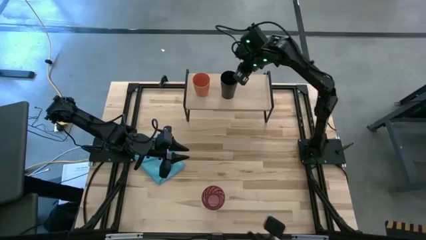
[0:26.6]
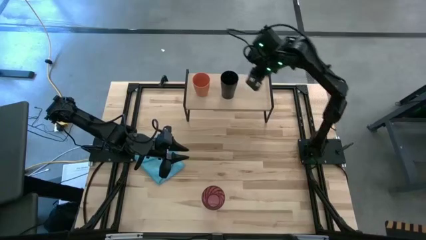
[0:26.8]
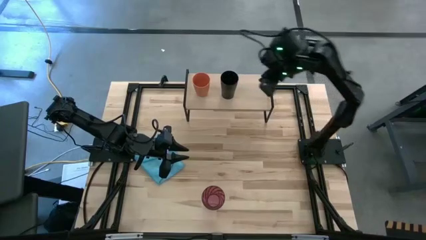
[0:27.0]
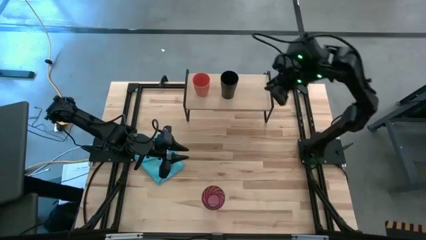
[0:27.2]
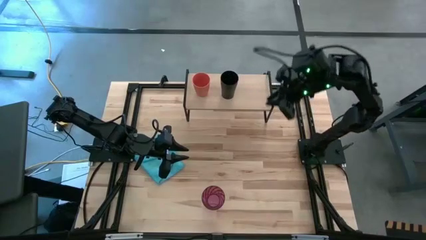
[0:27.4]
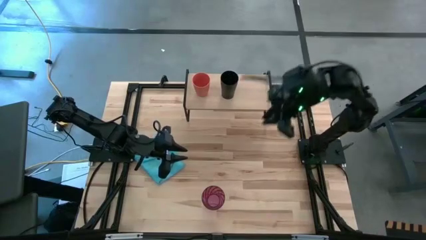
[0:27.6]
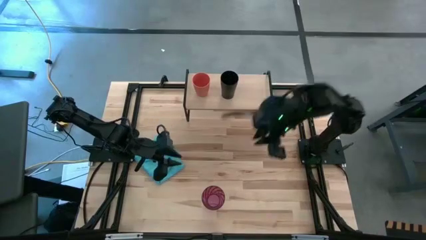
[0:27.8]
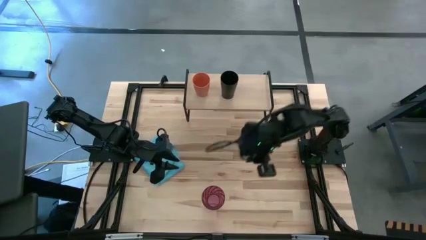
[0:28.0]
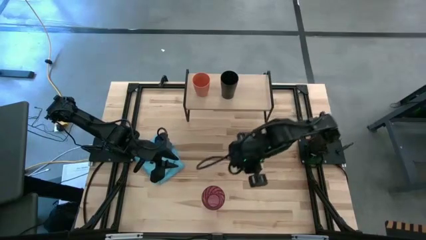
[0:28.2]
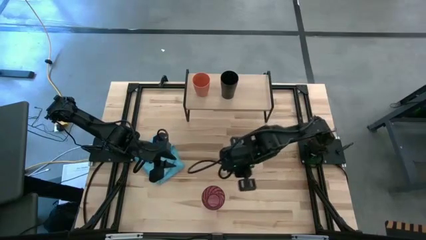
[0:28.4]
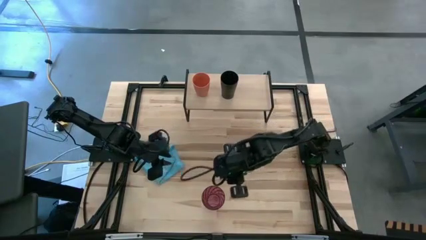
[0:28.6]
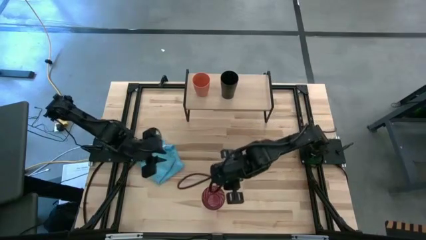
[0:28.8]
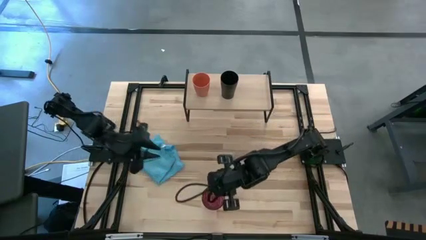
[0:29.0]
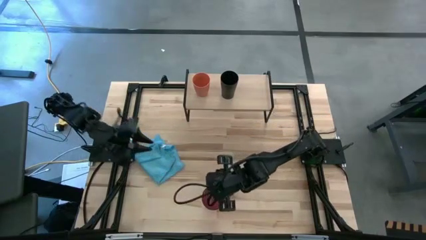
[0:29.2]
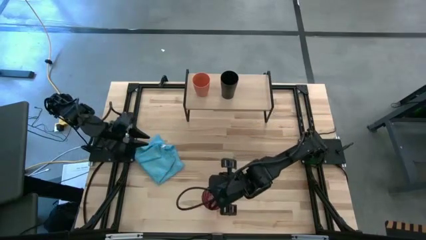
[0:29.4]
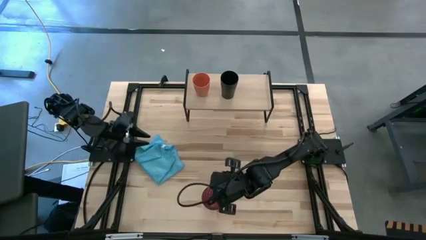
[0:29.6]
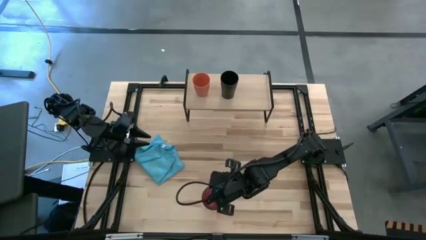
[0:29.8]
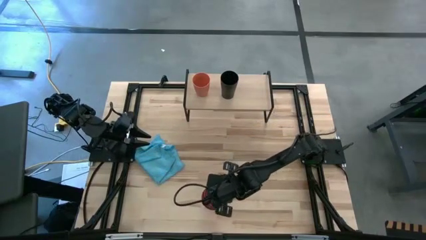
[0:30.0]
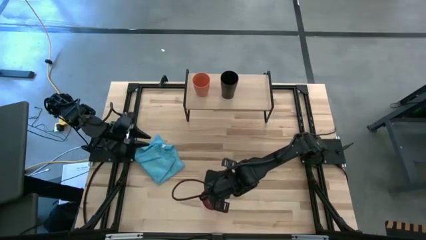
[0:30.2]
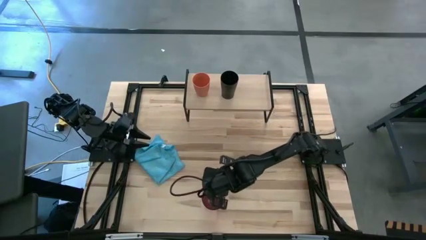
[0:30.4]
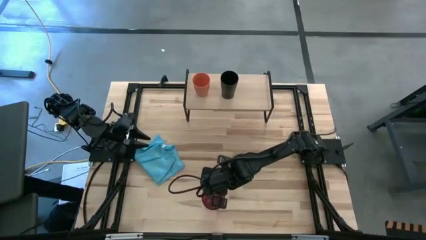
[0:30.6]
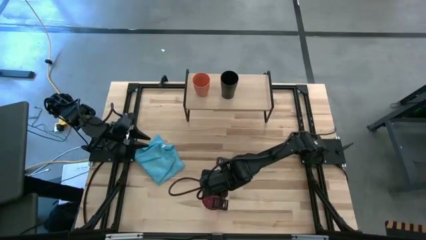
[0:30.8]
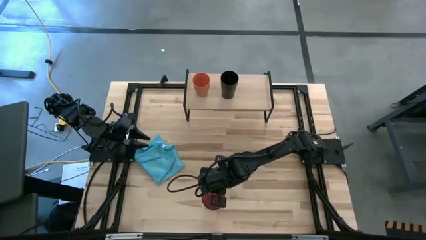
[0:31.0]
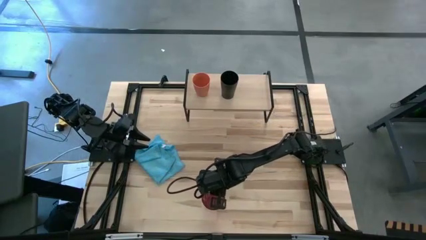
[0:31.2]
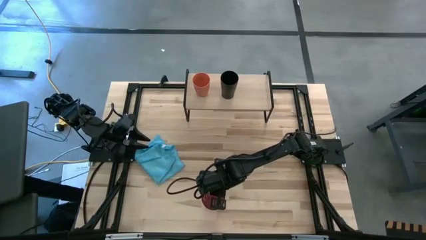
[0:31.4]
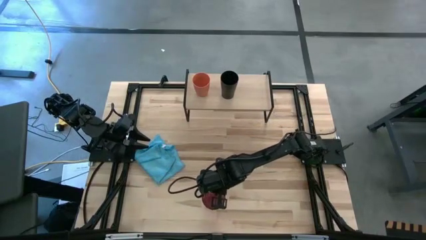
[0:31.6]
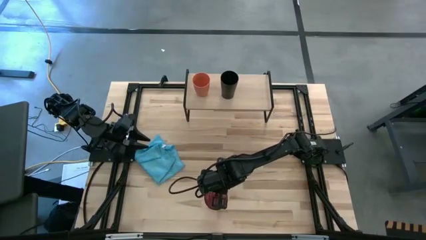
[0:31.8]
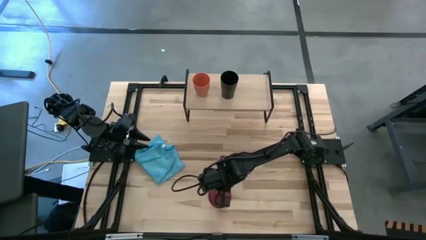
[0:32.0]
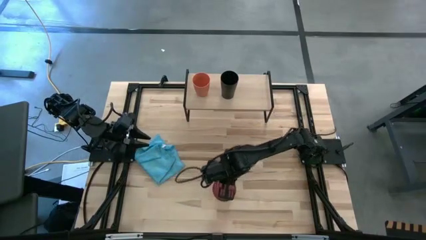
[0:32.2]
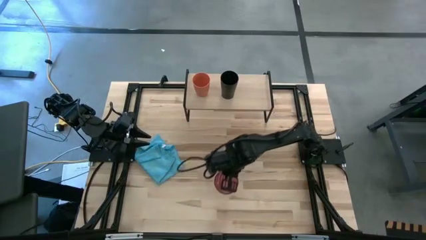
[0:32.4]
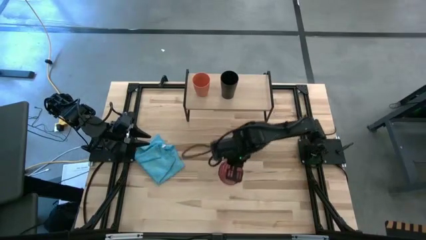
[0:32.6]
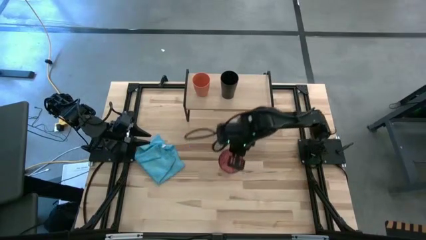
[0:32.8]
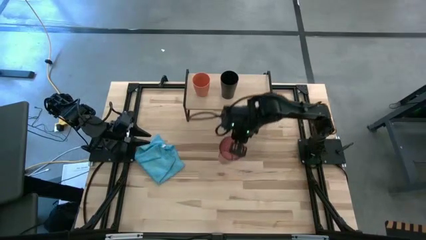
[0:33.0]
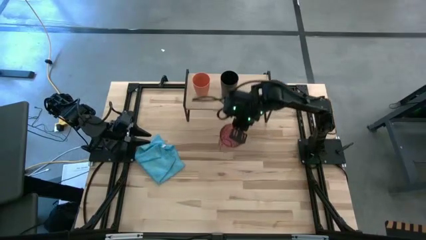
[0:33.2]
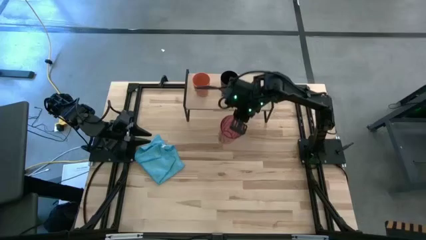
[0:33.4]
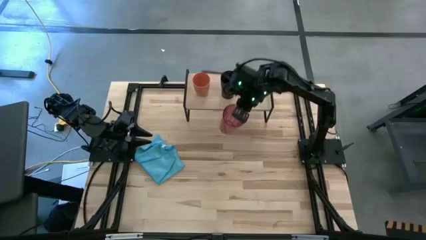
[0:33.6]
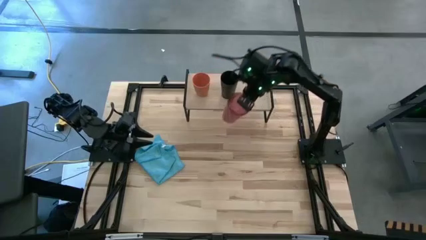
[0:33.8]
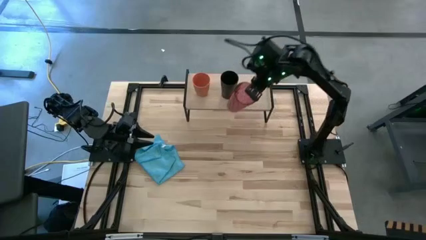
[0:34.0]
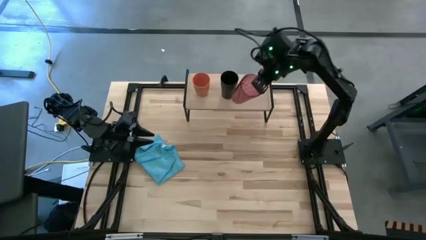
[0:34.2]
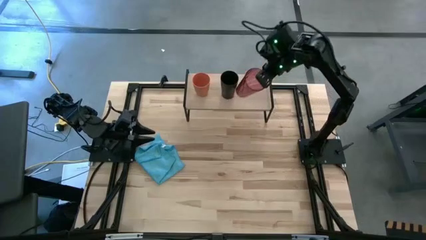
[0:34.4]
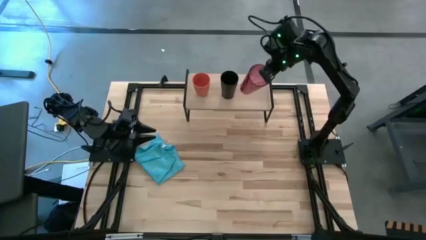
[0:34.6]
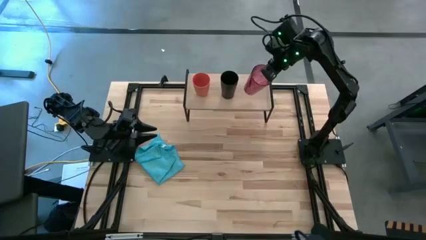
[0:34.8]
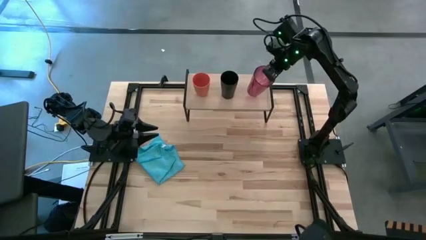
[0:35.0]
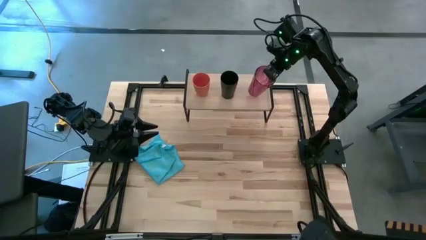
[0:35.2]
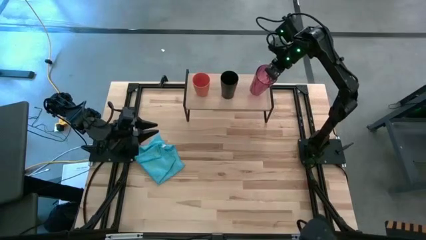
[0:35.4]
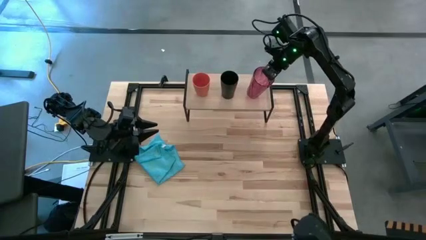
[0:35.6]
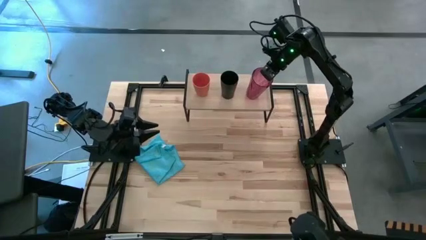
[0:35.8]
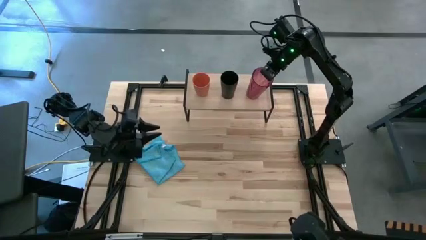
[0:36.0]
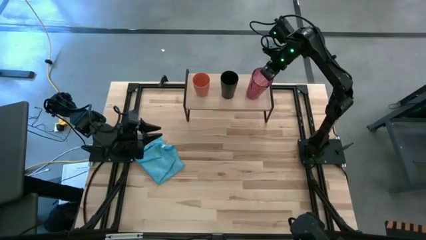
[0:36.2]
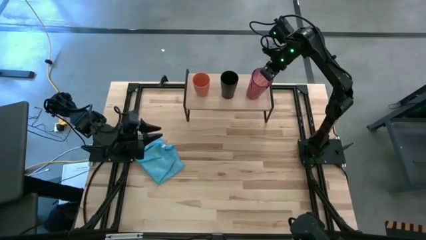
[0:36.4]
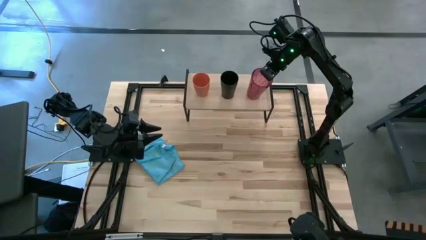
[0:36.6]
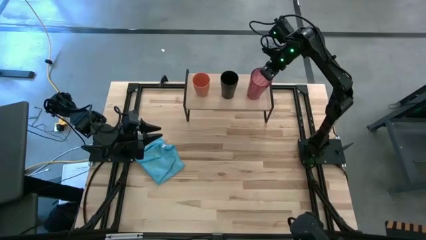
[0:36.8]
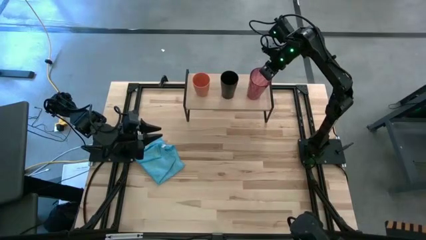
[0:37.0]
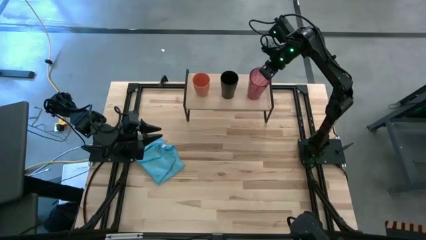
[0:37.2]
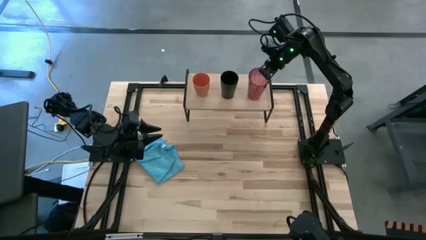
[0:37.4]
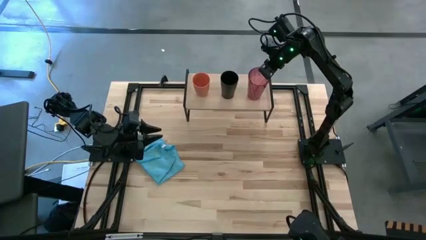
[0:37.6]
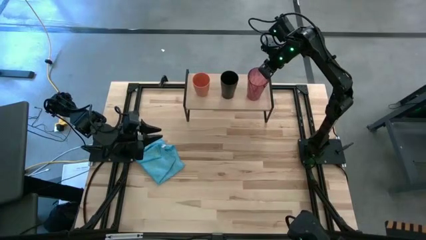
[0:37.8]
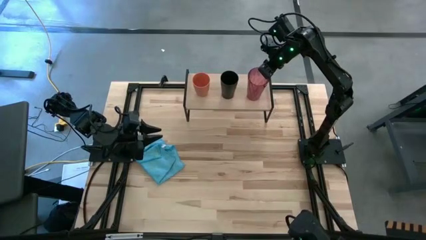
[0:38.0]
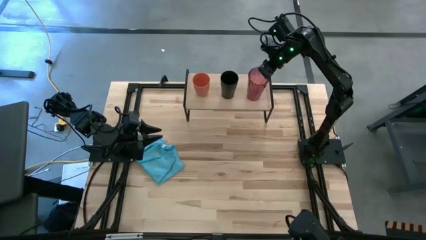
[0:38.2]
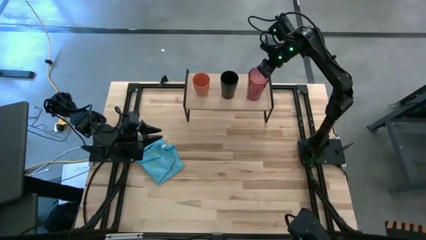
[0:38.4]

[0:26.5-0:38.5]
Task: Stack small to large cups/mugs on shelf
Put the red glass on the shelf
